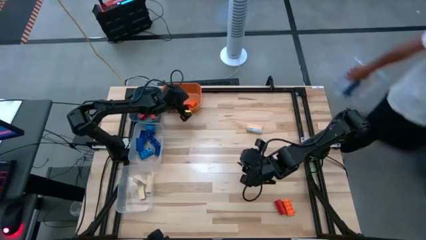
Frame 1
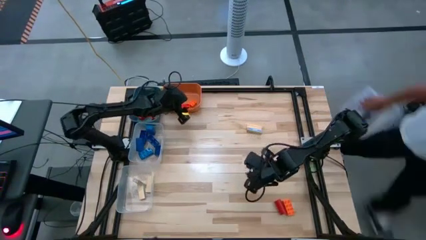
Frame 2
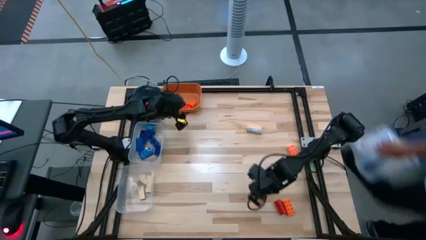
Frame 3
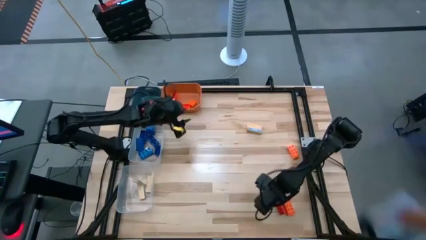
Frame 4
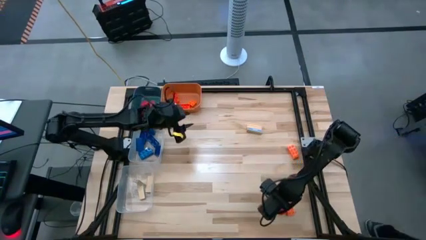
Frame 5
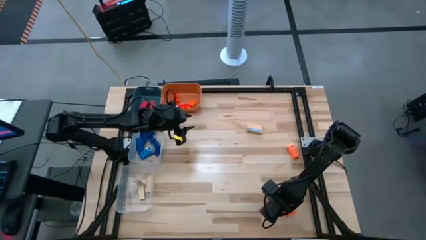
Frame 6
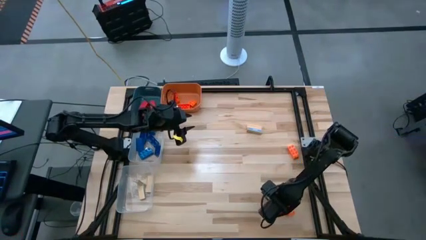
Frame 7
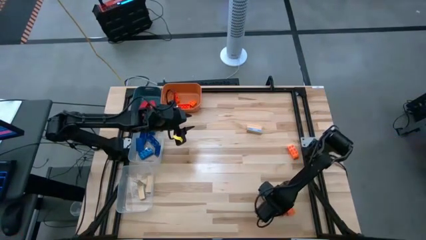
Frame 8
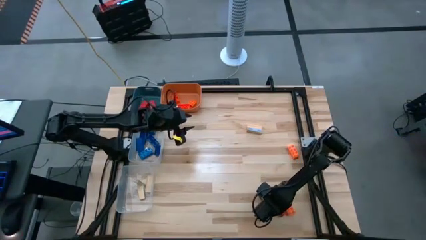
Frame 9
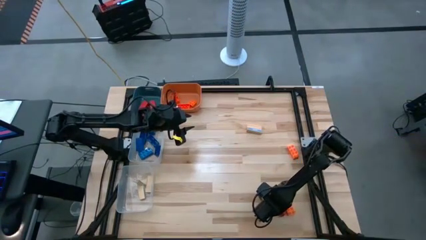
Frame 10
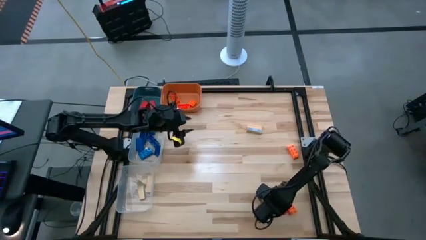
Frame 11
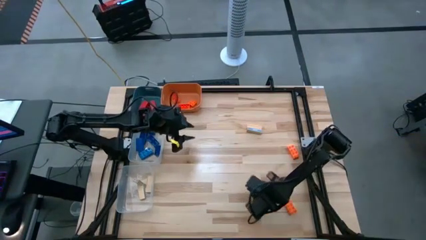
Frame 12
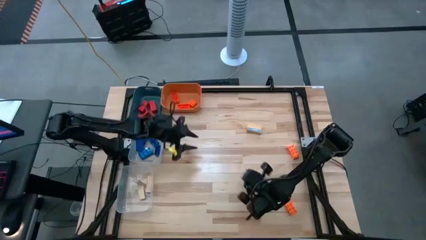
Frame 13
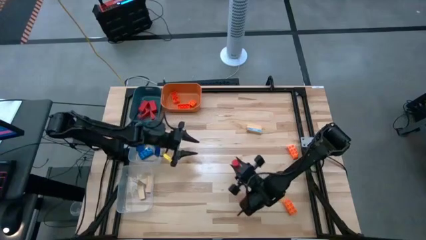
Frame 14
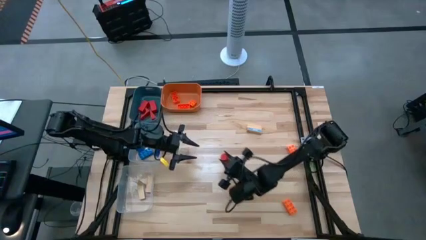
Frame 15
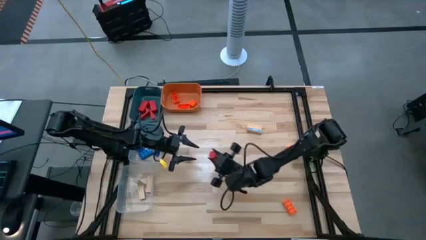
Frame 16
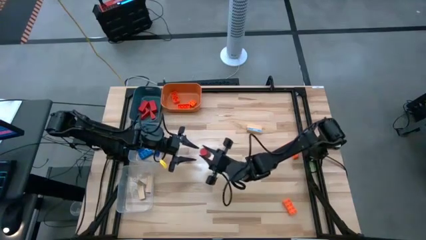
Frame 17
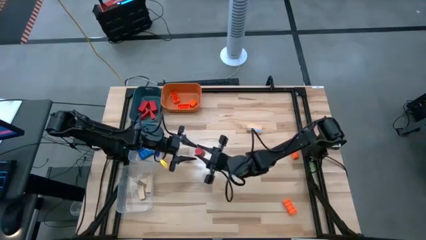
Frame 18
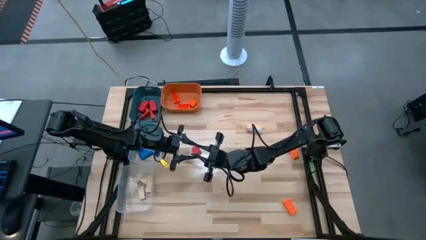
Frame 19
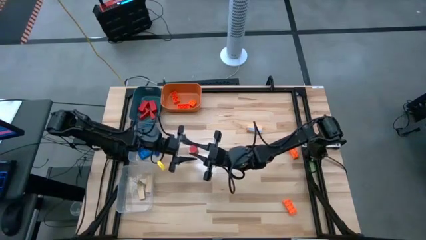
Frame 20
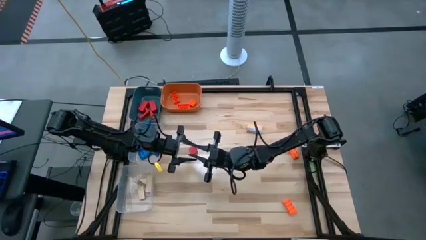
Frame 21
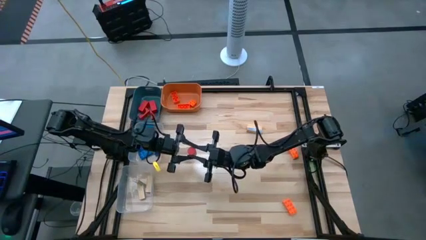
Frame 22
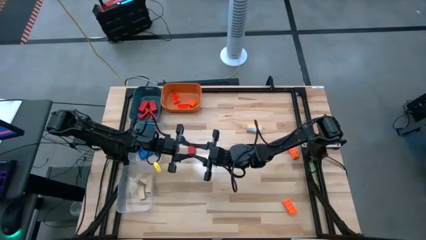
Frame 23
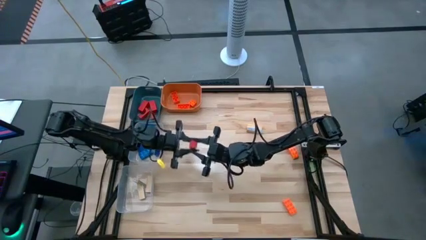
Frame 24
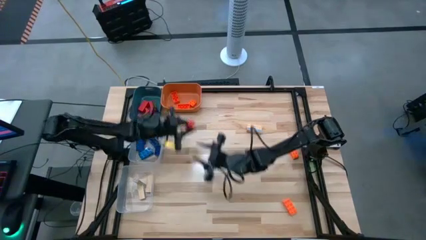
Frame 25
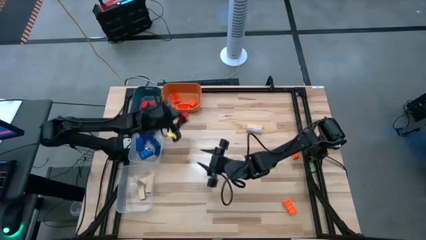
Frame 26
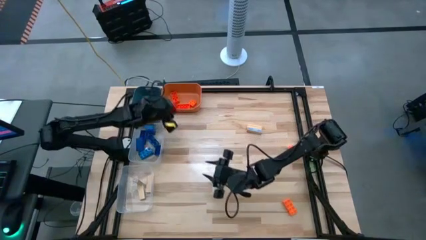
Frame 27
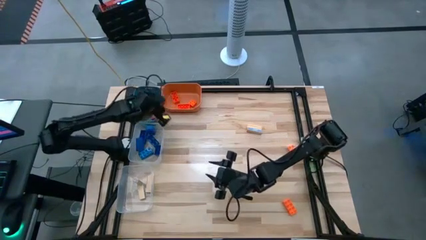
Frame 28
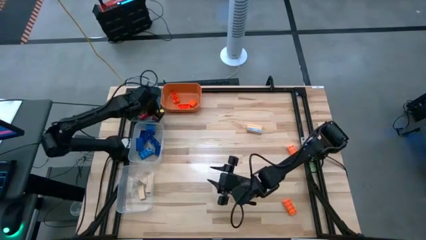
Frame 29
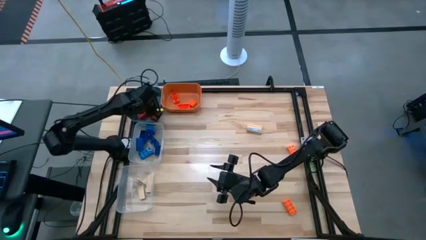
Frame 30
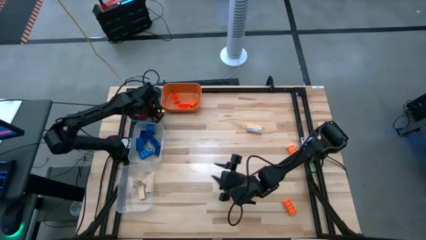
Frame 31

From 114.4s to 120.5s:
Task: Sort blocks
Put the wooden red block into the blue bin

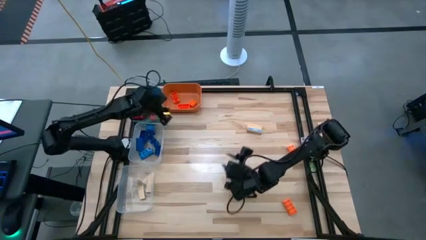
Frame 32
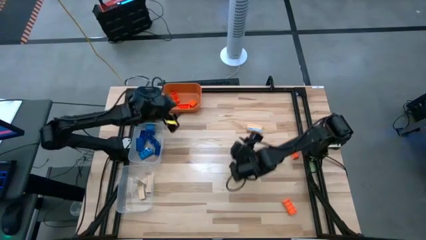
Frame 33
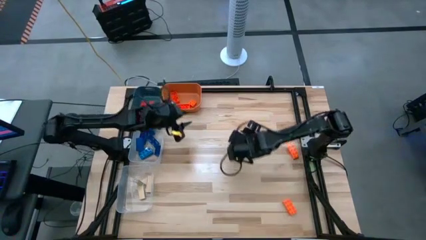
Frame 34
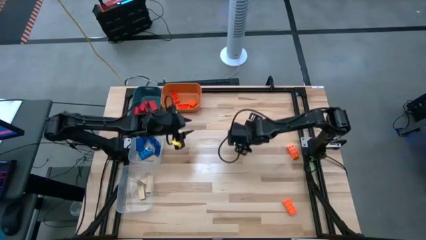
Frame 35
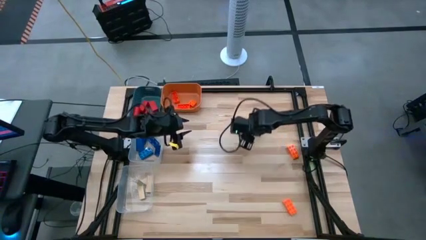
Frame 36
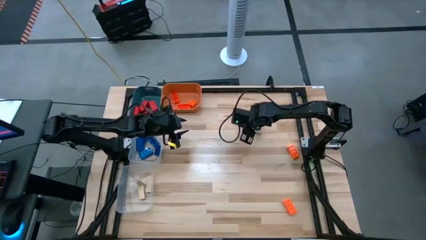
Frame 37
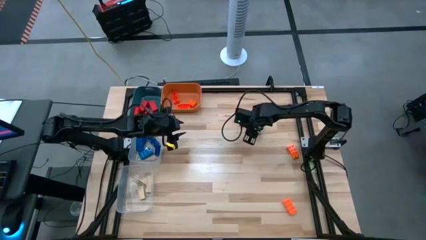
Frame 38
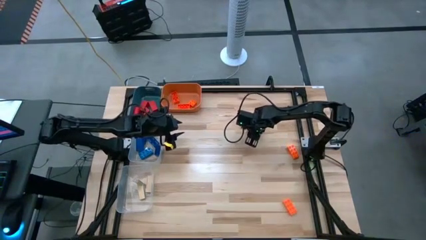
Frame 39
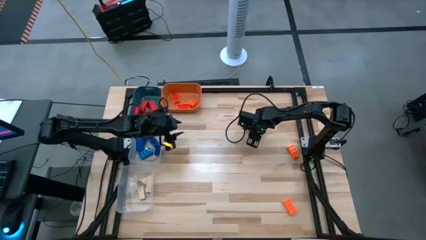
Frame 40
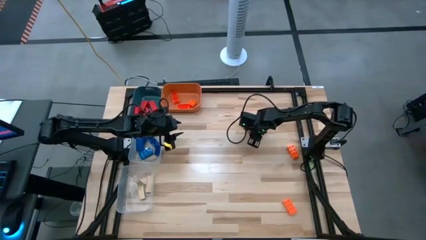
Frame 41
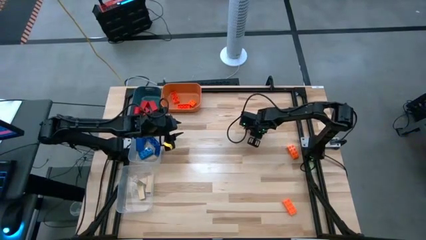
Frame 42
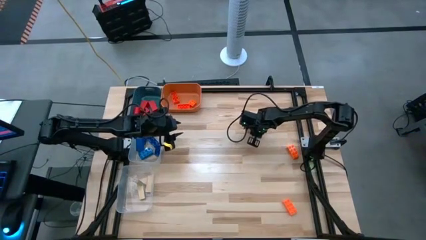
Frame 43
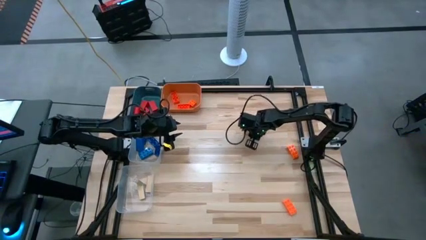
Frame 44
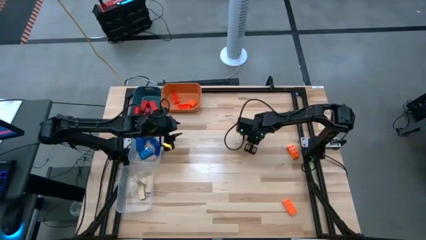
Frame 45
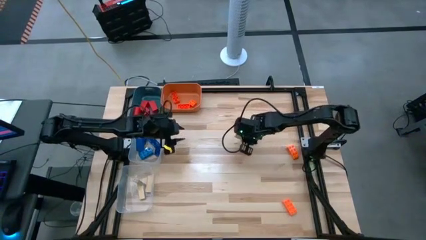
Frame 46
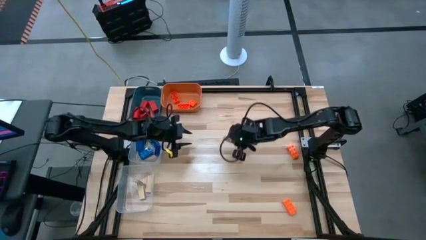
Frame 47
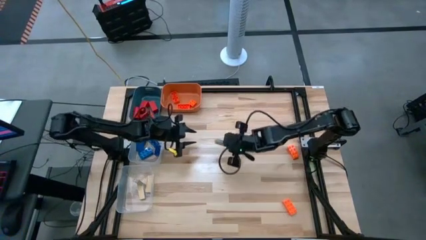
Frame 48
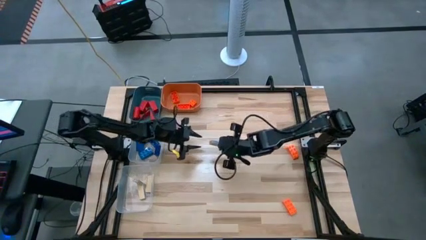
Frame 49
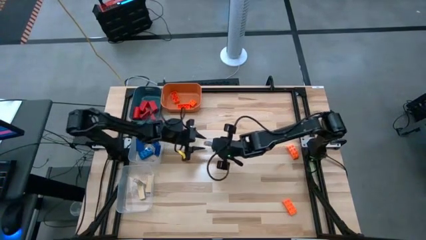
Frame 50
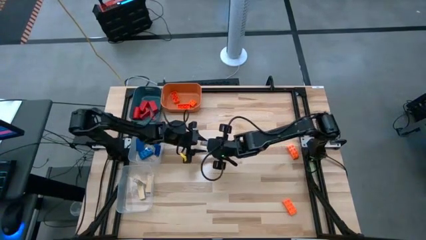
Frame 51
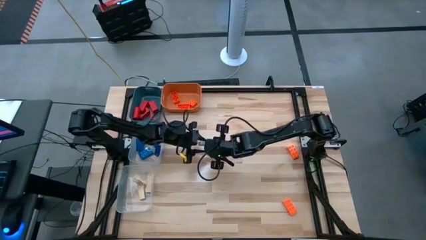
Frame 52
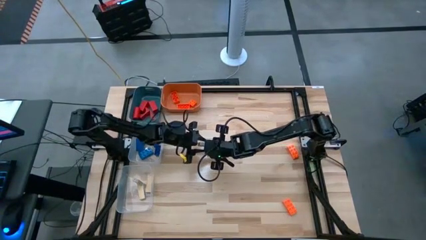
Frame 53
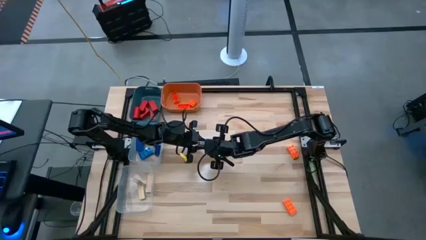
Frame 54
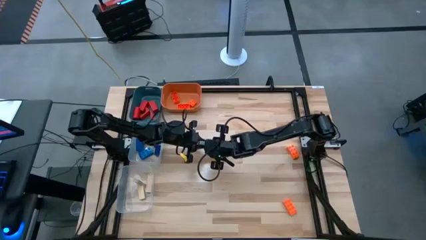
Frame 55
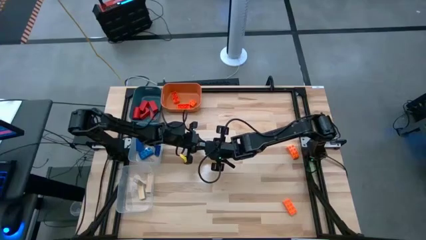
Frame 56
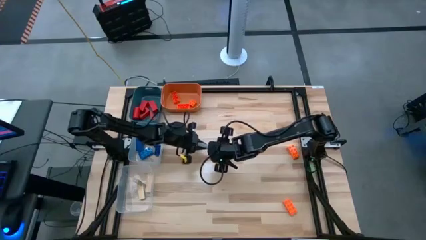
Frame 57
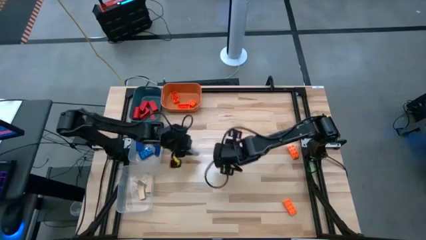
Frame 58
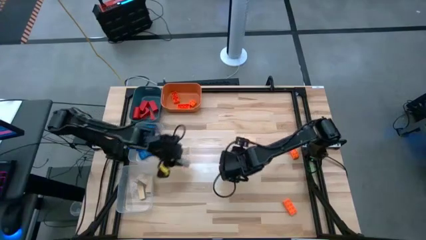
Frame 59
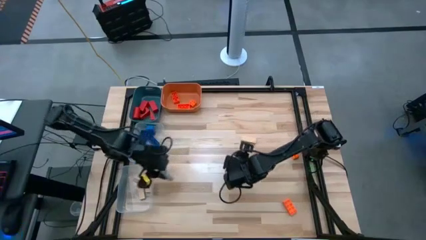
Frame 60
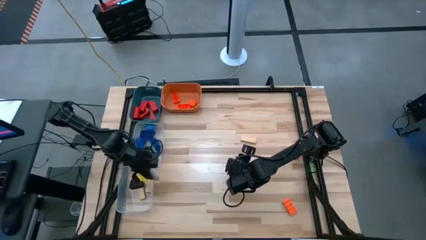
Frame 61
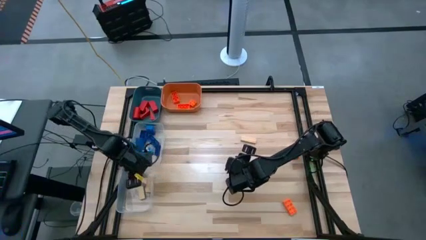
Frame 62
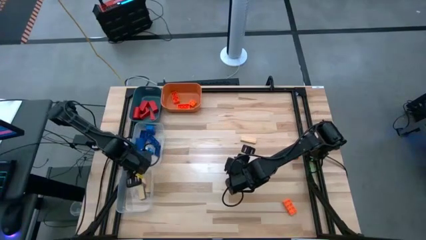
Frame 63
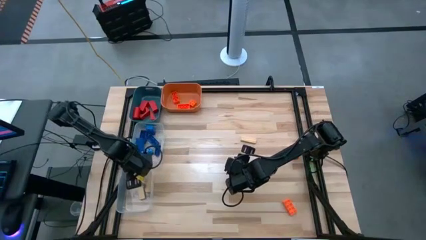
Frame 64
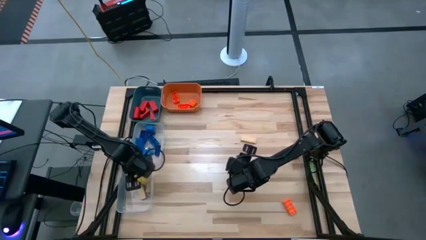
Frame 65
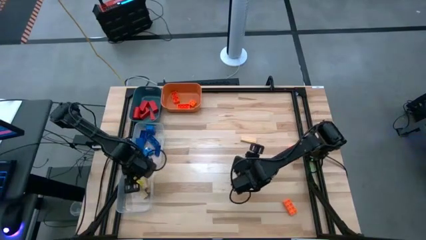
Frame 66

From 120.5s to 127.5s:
Put the wooden brown block into the bottom transparent bin

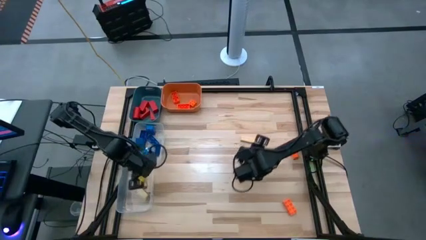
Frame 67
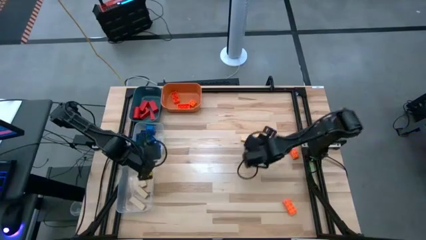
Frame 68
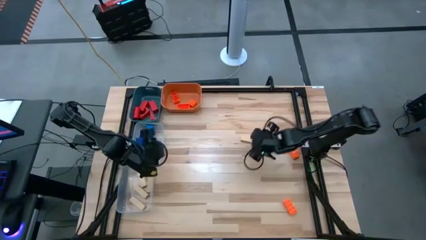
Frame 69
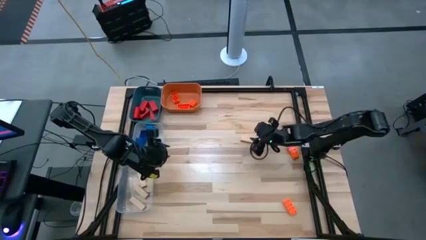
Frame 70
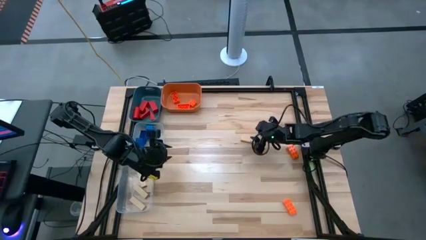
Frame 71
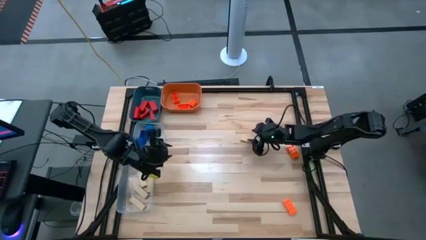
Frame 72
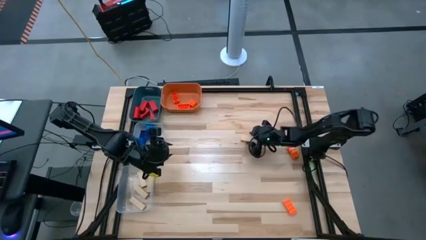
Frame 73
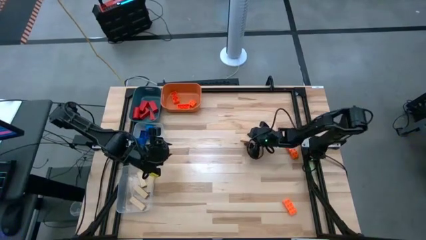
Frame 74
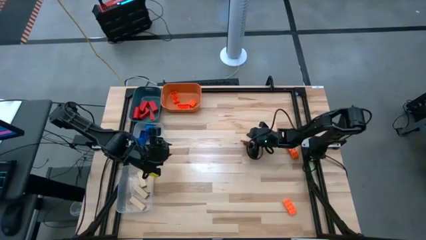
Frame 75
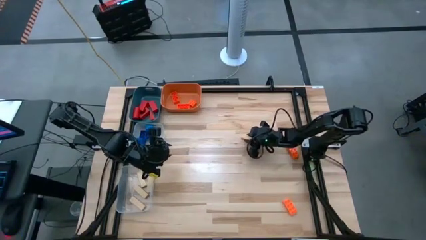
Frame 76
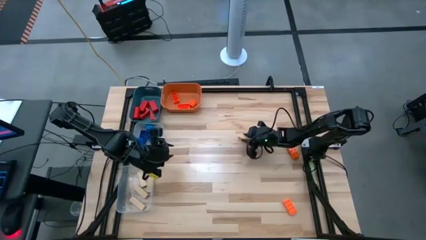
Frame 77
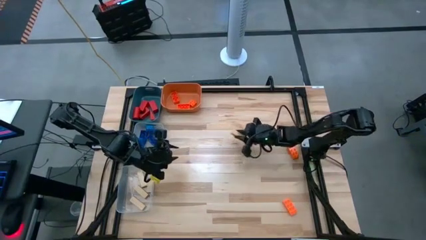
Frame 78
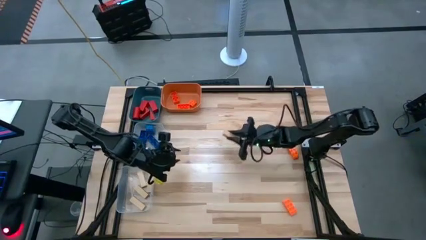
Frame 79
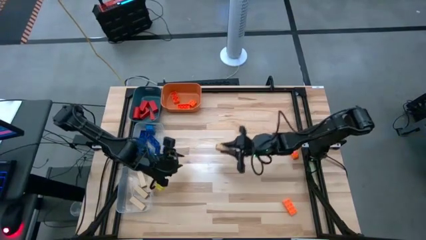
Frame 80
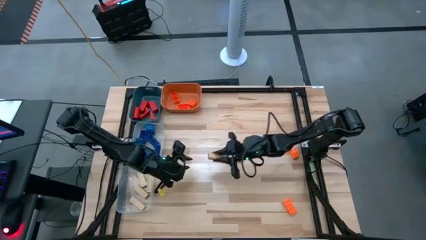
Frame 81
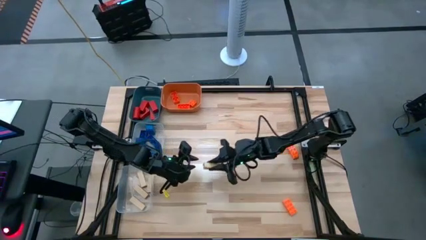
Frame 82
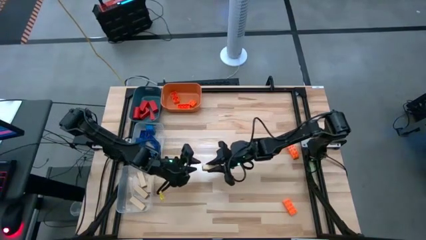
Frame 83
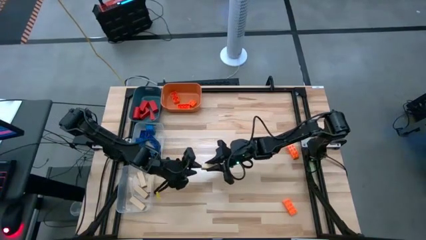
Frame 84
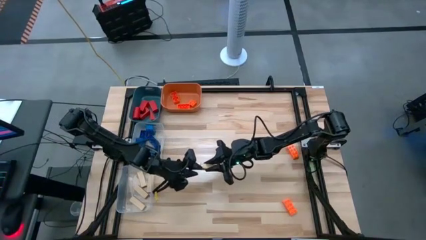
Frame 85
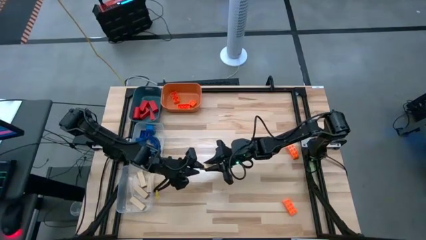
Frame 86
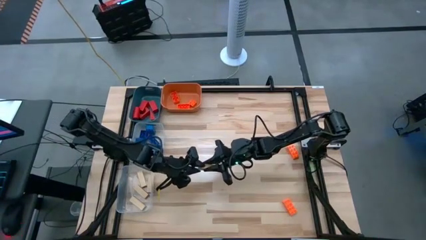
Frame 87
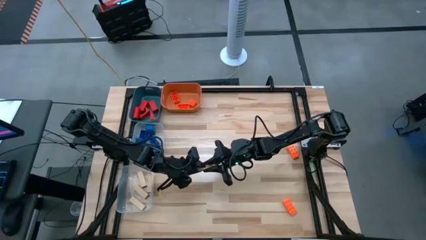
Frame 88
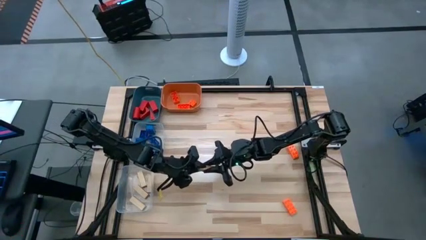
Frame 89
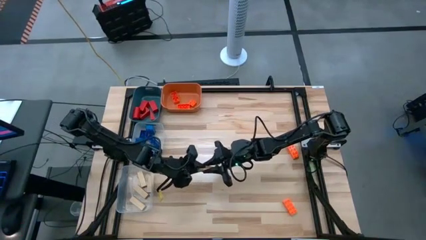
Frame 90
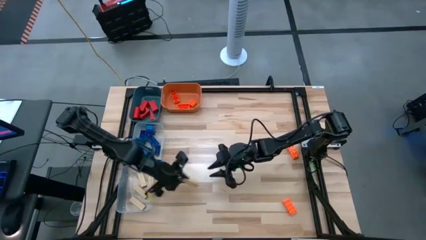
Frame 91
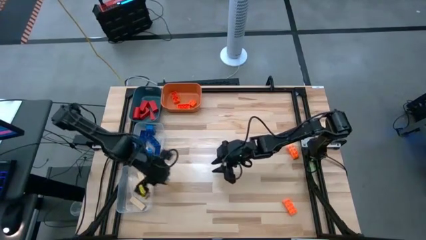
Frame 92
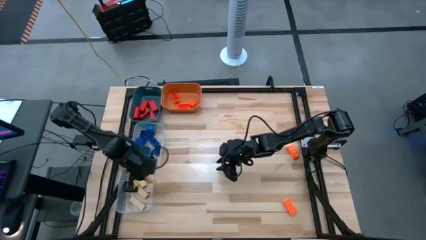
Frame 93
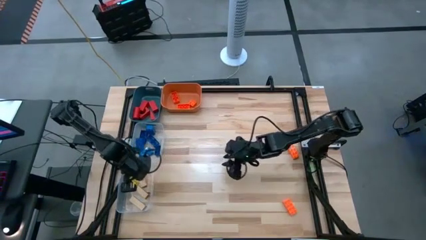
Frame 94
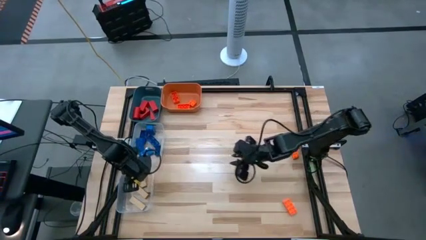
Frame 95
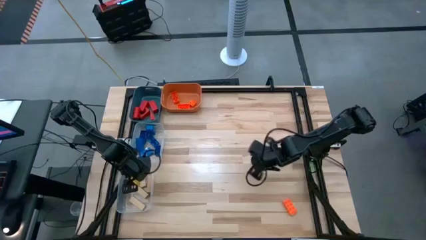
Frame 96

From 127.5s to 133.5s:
Put the wooden brown block into the bottom transparent bin
